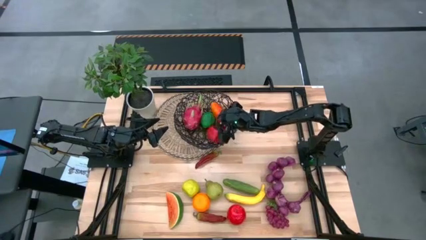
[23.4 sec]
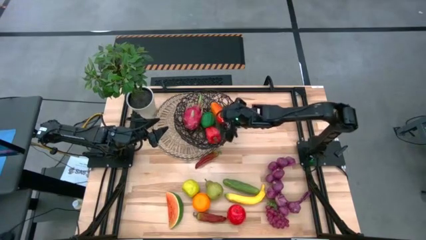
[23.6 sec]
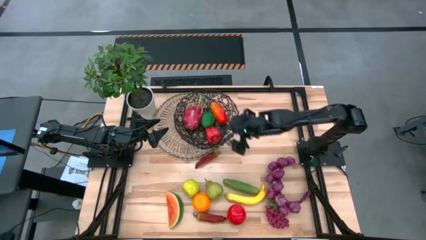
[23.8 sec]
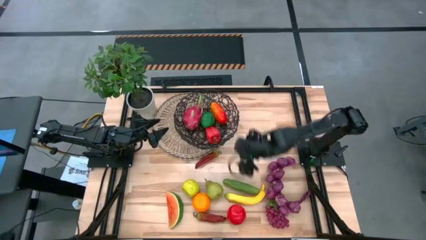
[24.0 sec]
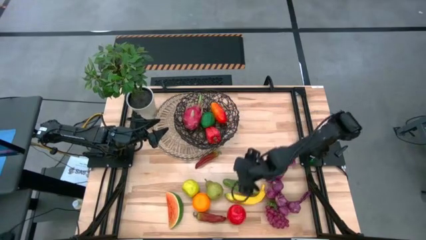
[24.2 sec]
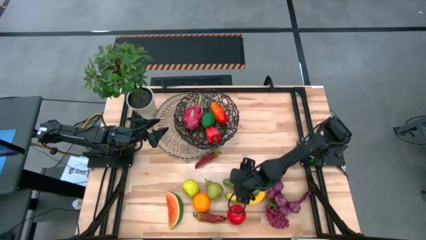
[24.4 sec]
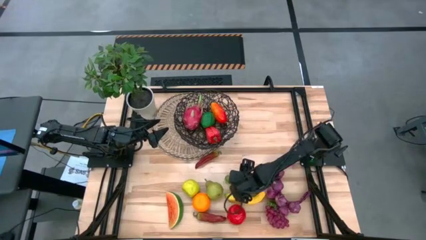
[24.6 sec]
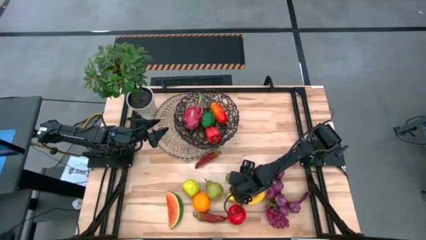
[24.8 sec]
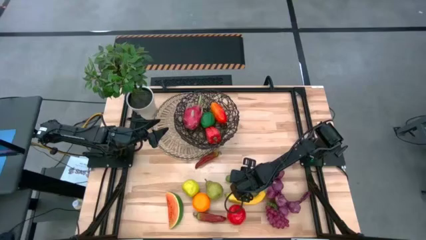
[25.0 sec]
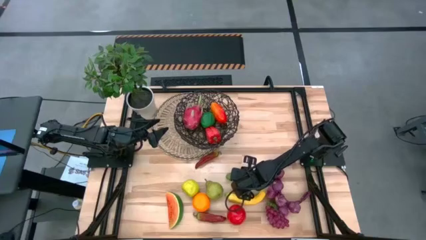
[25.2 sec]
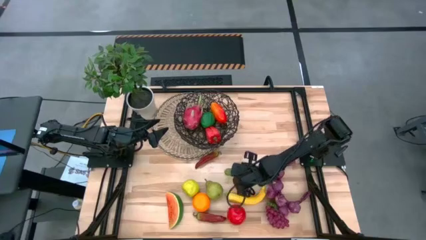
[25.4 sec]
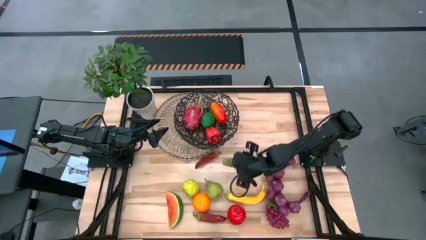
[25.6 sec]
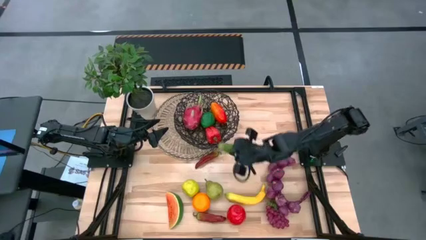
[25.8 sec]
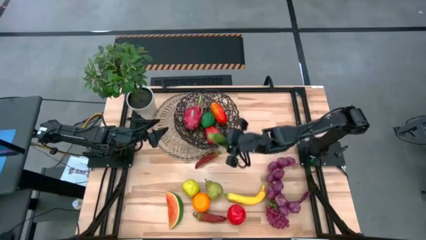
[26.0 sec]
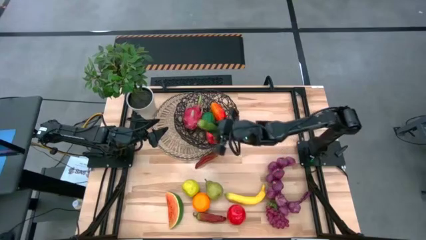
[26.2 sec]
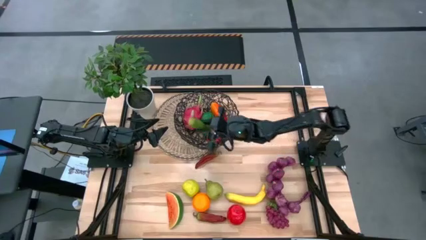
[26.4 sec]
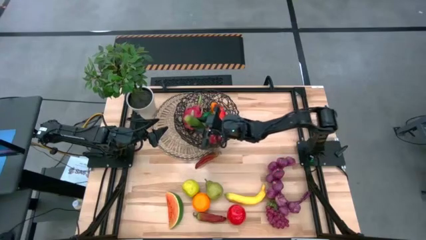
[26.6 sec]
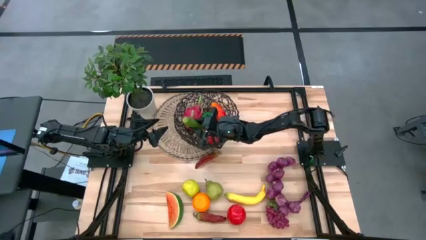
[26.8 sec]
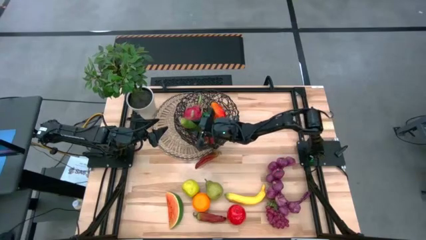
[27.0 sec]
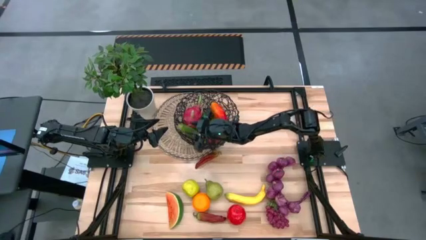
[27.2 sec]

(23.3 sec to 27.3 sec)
Task: Build produce basket
Put the cucumber into the wire basket

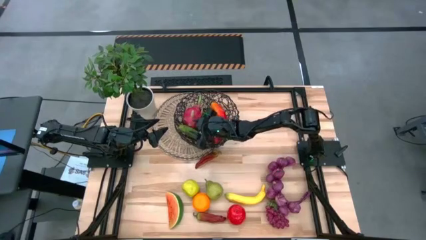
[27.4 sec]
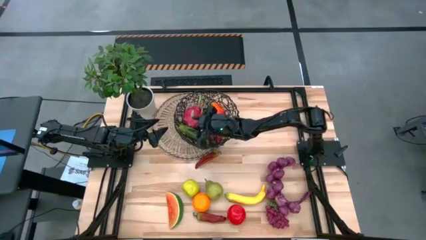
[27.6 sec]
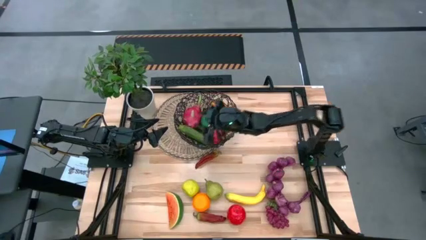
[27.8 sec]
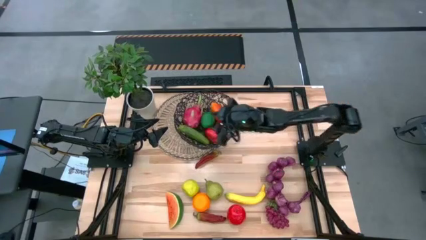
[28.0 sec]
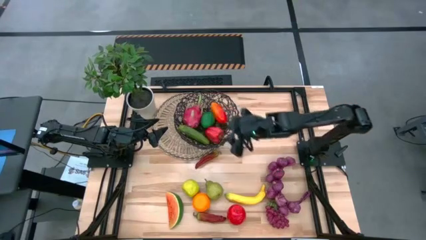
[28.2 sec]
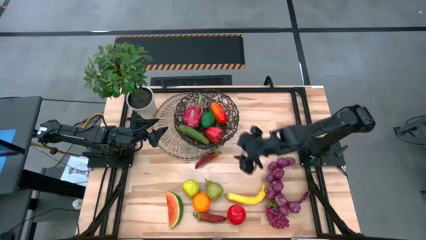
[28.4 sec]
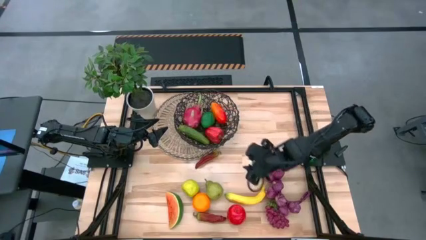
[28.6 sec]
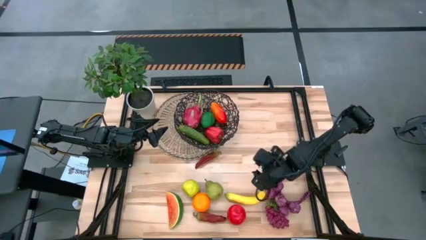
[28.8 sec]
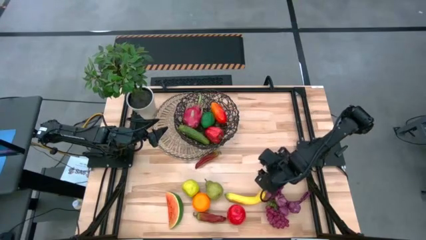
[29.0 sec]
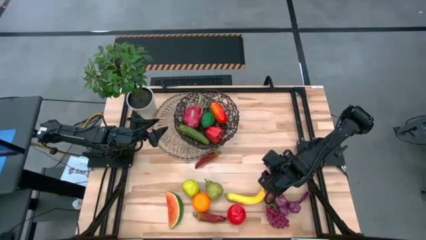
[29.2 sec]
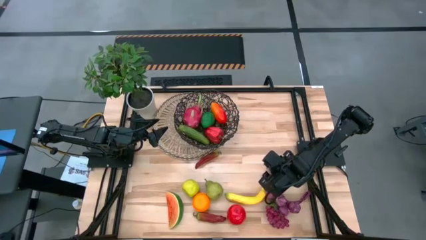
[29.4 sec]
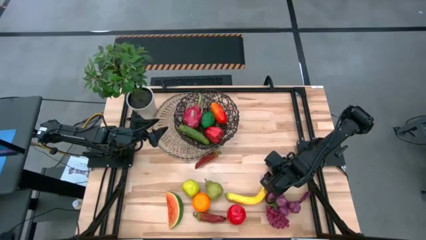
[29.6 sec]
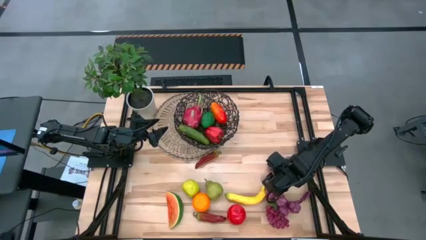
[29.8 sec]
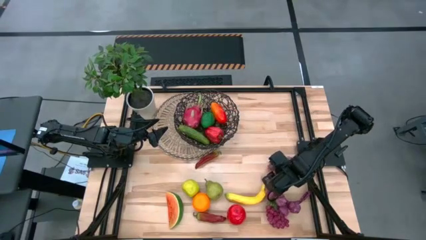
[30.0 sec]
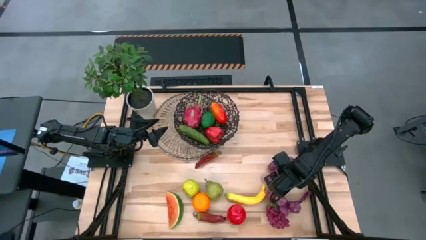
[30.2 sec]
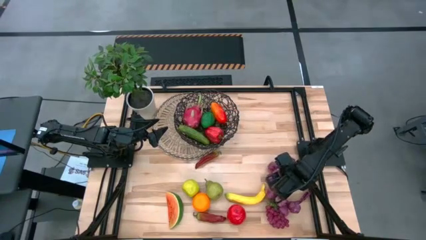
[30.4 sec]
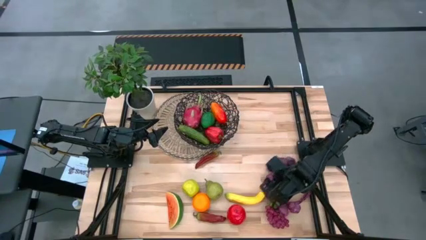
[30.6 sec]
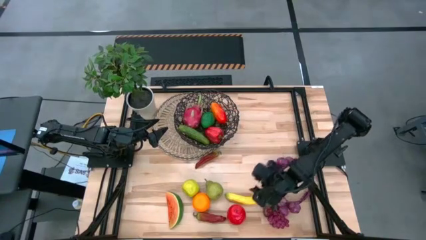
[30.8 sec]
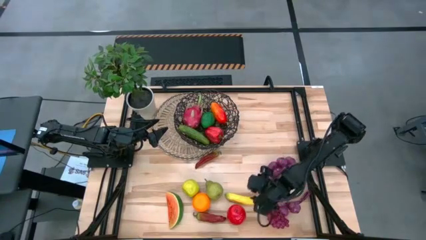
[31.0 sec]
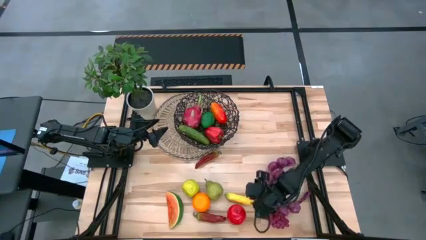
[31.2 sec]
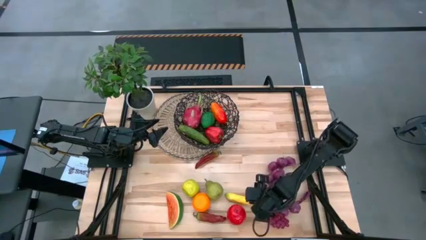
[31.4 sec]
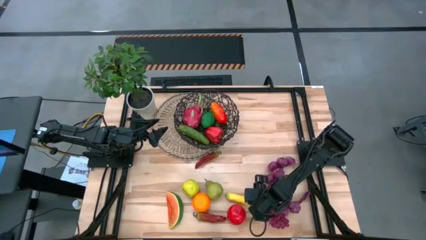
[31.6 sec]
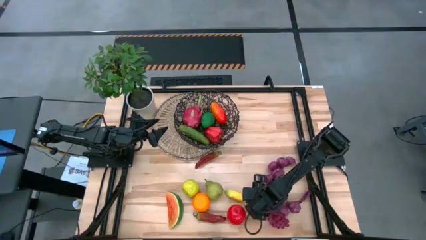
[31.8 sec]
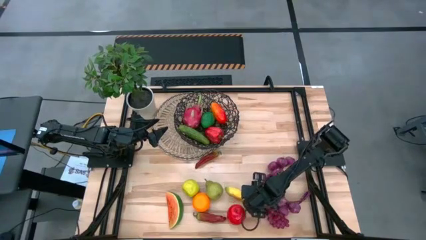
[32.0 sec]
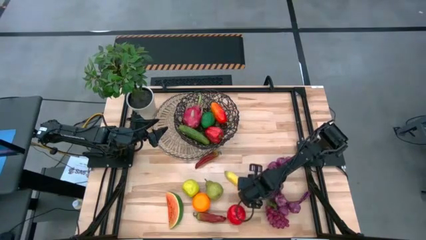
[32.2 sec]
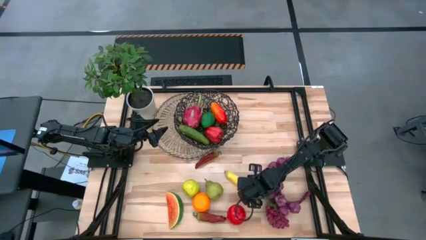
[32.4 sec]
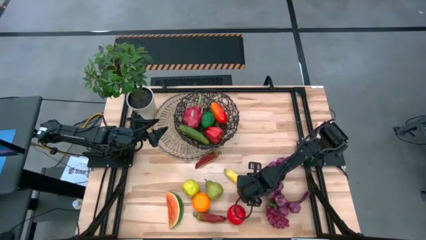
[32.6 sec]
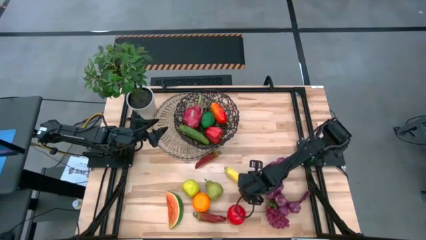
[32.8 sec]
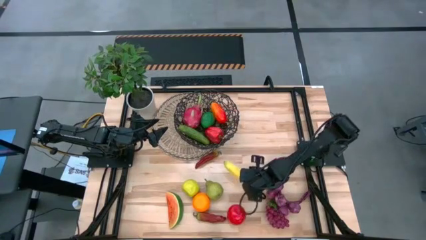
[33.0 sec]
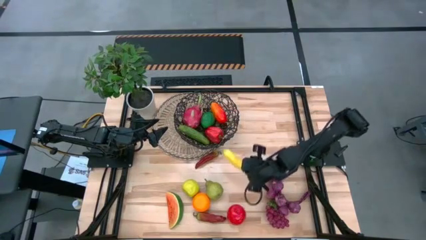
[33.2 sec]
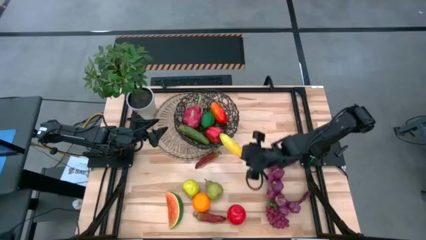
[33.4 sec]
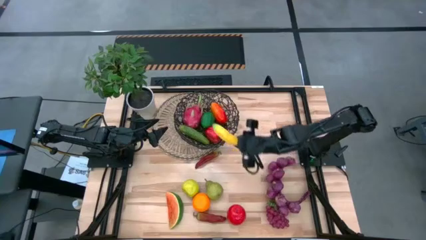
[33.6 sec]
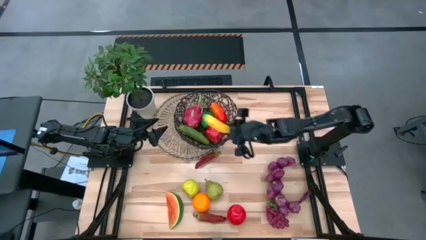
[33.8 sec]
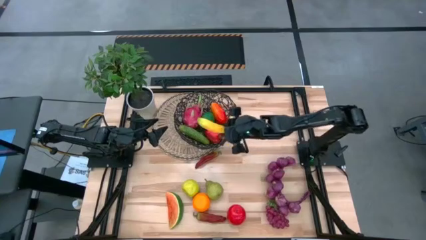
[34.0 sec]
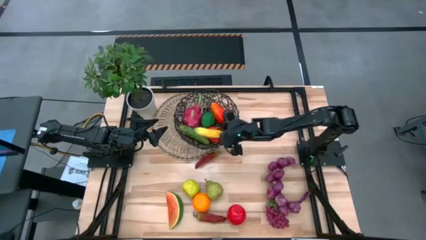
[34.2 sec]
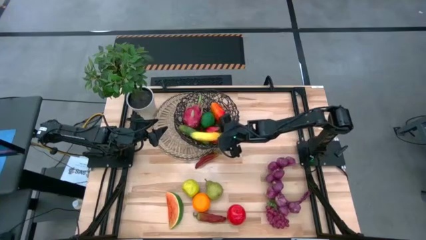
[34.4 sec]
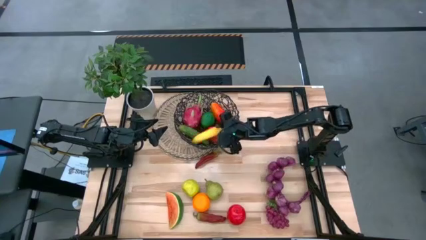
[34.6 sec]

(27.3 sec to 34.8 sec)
Put the banana into the wire basket

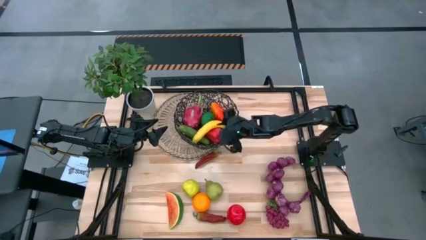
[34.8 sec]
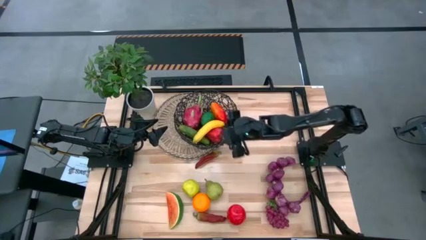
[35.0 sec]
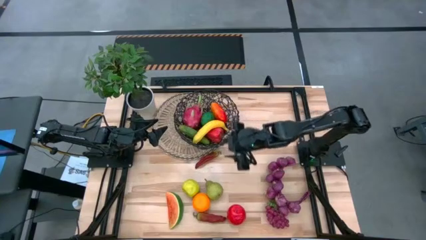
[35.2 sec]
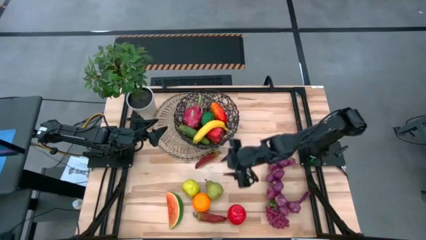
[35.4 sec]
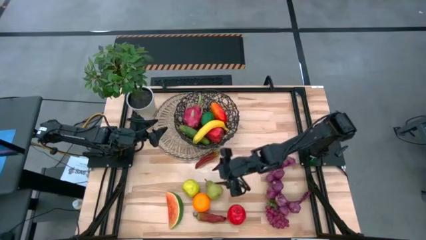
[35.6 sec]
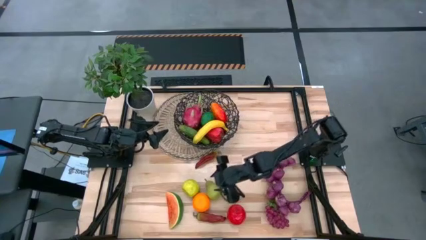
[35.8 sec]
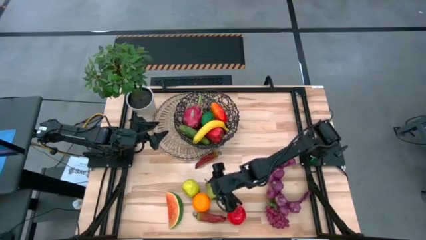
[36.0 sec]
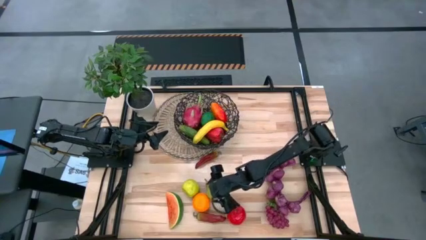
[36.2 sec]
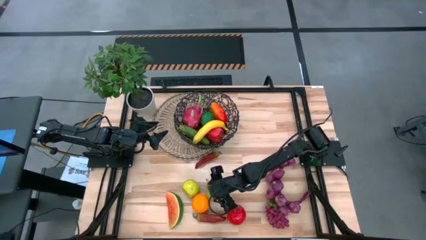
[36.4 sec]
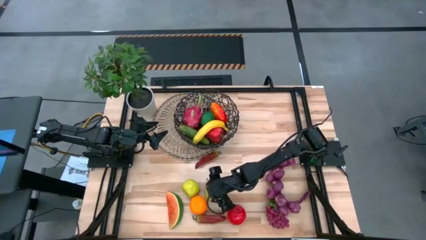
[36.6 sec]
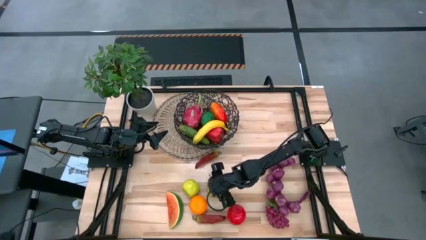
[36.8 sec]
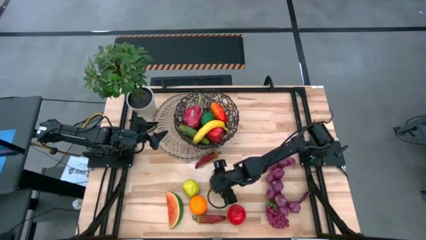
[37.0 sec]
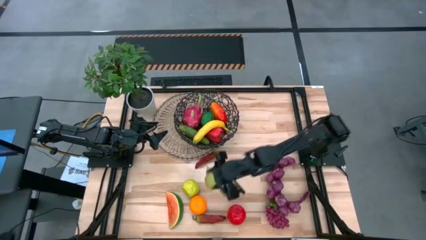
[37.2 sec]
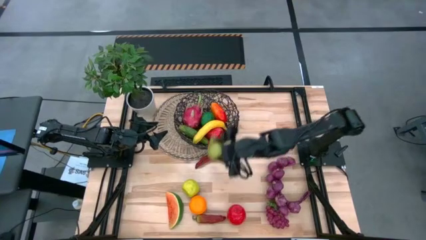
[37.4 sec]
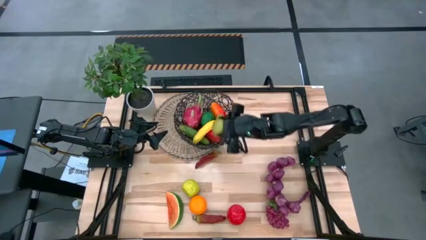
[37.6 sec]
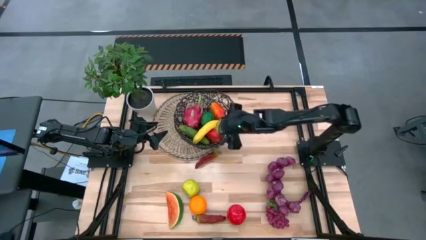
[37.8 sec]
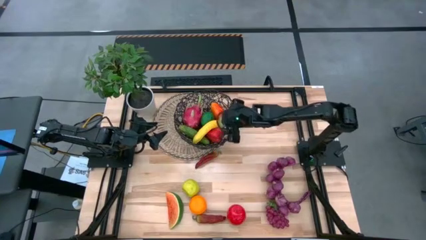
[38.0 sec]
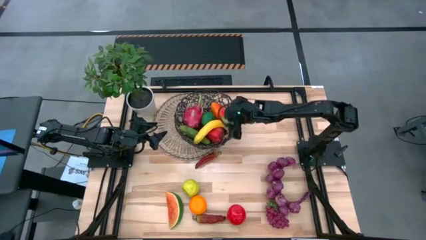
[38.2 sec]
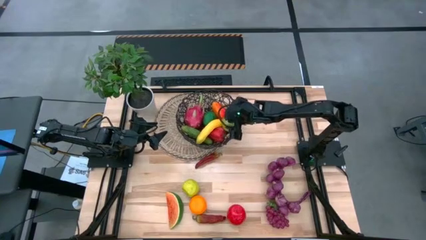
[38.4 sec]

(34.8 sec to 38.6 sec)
Put the pear into the wire basket

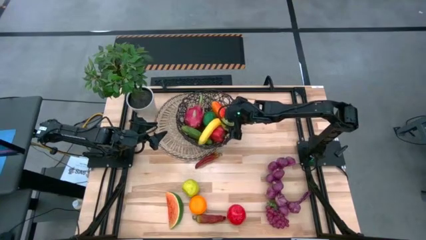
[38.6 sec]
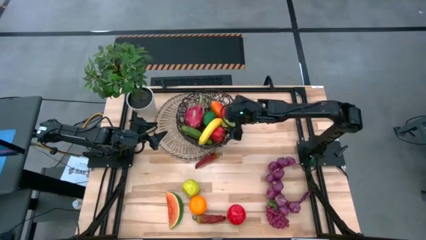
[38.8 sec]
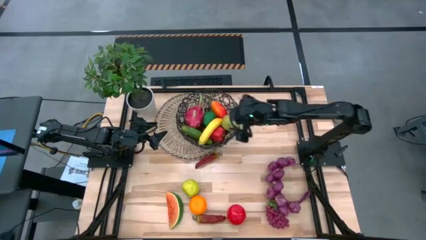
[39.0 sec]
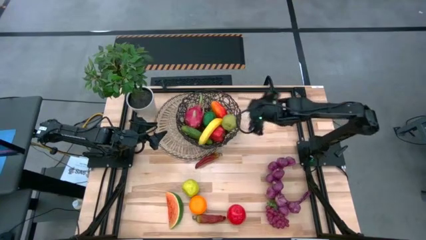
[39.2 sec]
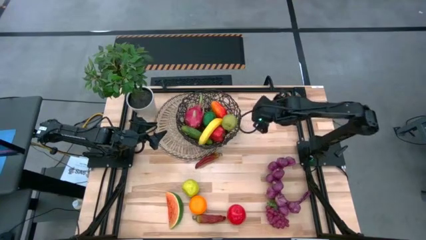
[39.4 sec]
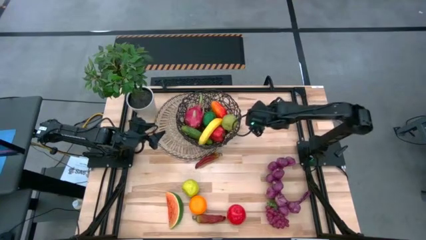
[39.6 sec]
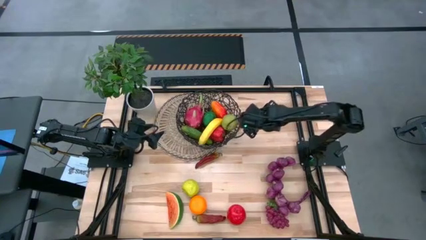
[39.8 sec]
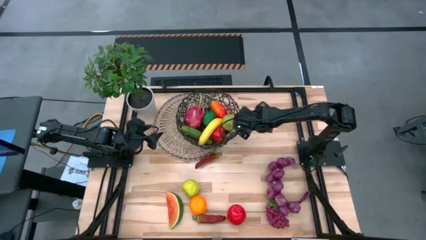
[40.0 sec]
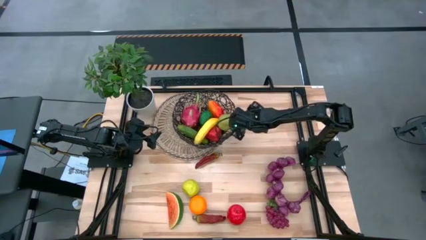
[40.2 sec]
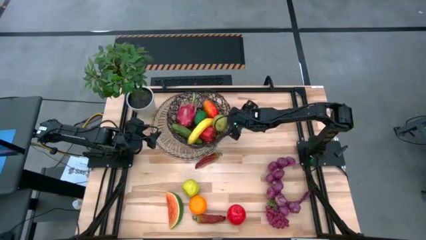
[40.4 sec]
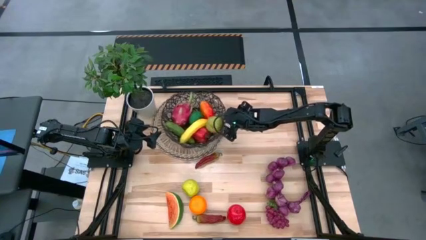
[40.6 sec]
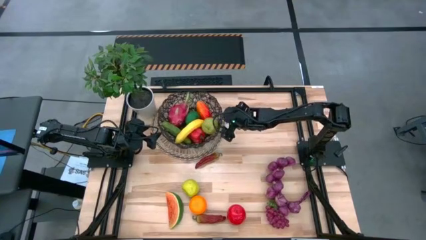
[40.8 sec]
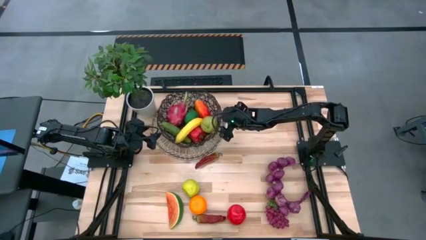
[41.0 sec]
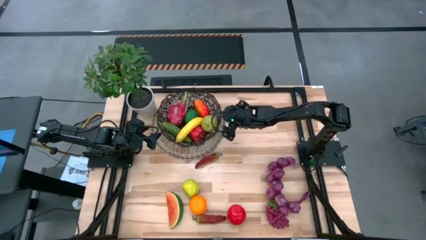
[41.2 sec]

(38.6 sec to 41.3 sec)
Adjust the wire basket
